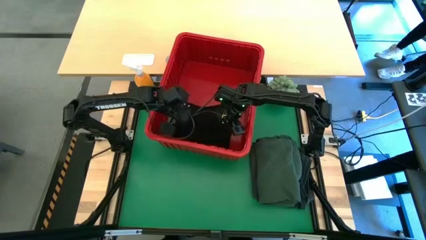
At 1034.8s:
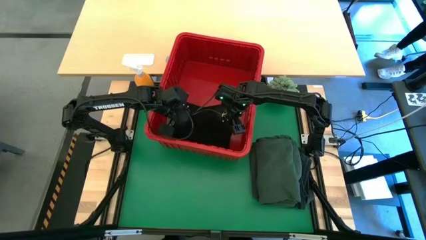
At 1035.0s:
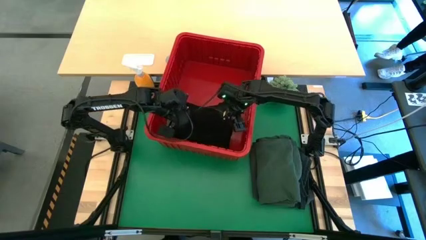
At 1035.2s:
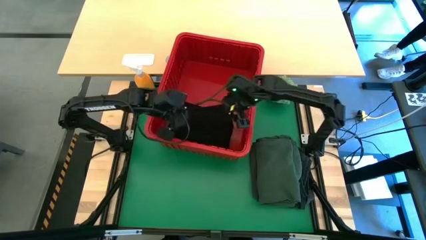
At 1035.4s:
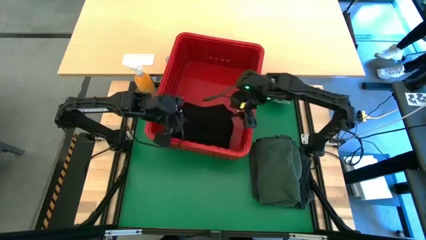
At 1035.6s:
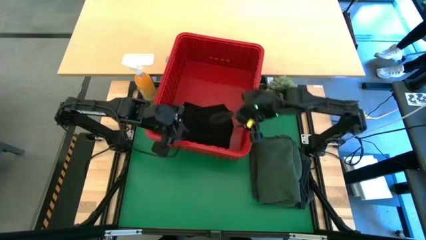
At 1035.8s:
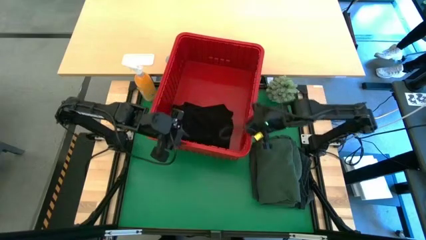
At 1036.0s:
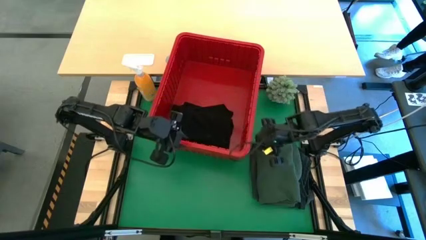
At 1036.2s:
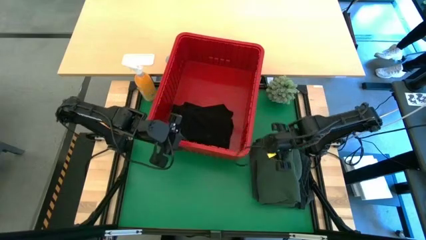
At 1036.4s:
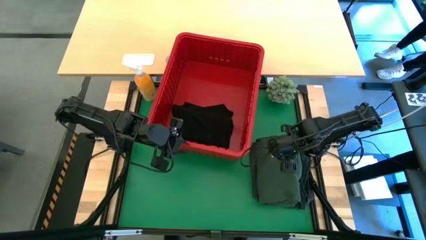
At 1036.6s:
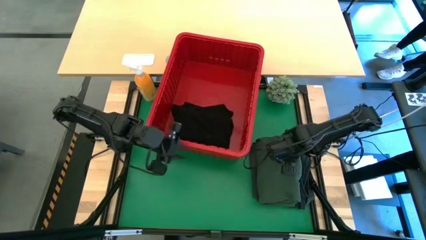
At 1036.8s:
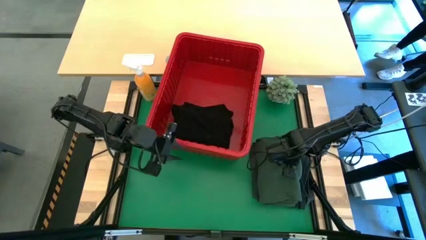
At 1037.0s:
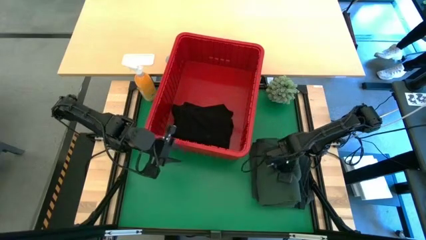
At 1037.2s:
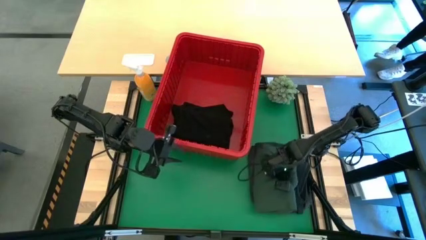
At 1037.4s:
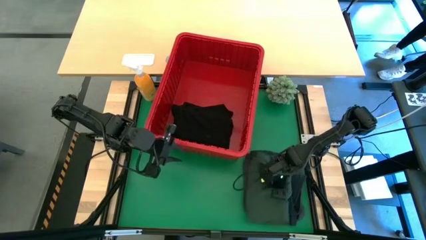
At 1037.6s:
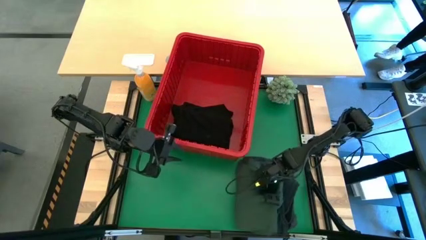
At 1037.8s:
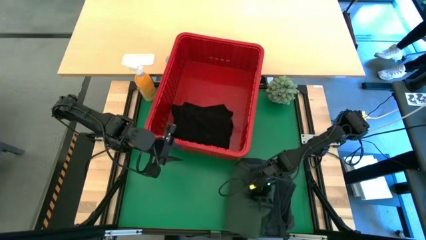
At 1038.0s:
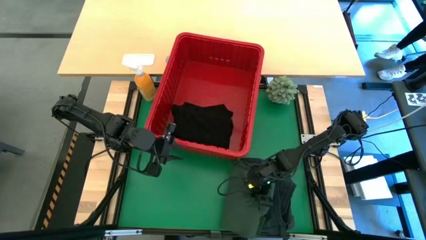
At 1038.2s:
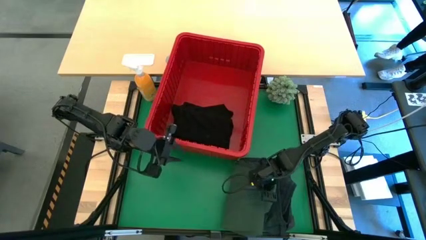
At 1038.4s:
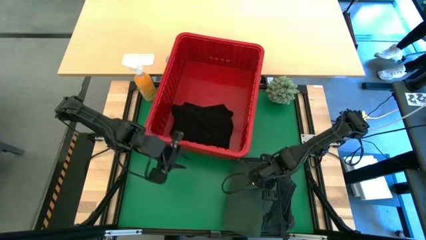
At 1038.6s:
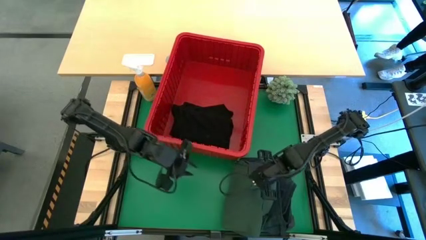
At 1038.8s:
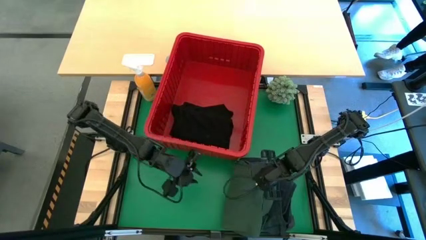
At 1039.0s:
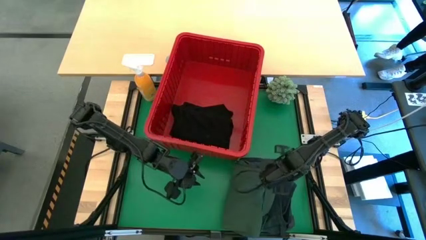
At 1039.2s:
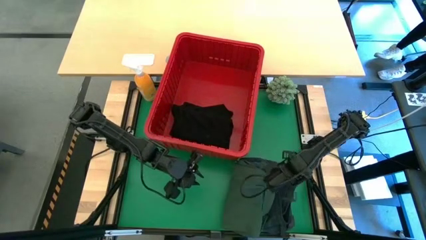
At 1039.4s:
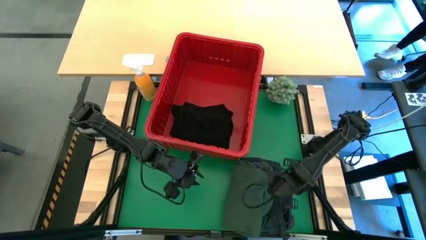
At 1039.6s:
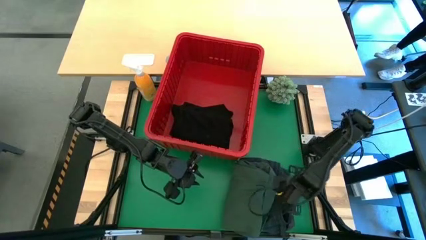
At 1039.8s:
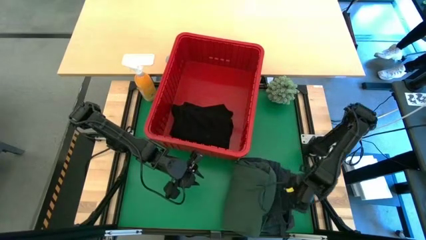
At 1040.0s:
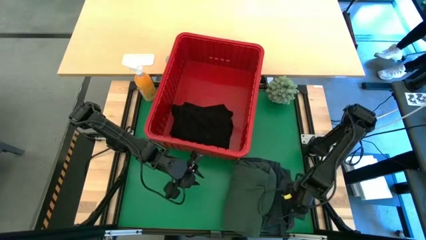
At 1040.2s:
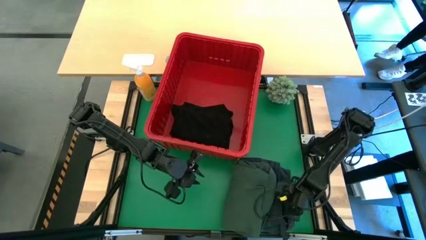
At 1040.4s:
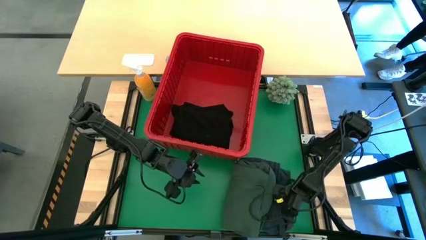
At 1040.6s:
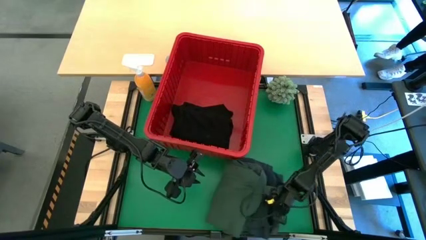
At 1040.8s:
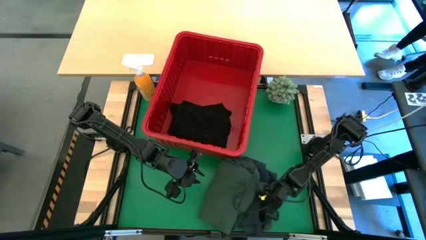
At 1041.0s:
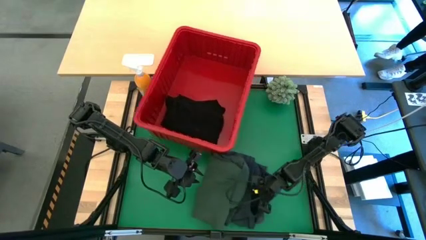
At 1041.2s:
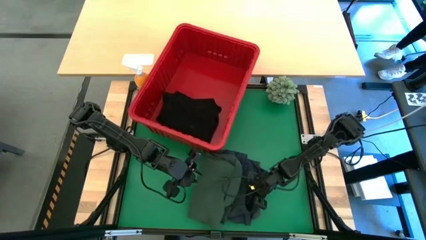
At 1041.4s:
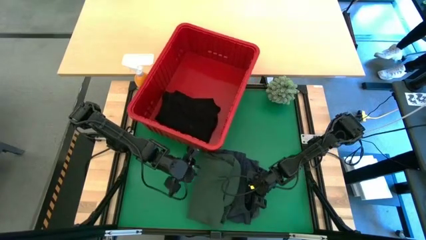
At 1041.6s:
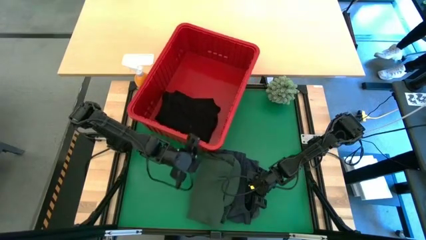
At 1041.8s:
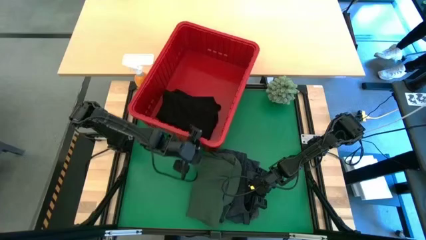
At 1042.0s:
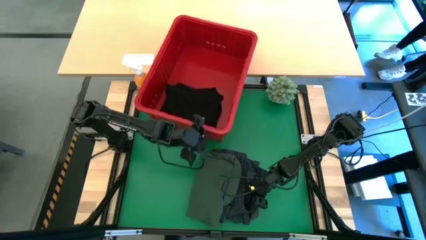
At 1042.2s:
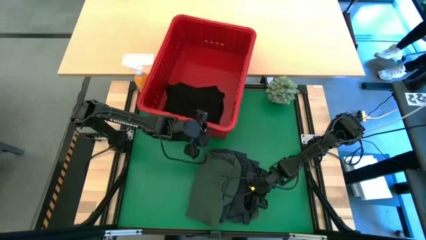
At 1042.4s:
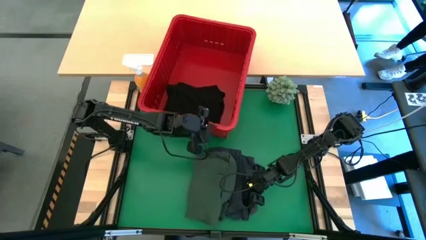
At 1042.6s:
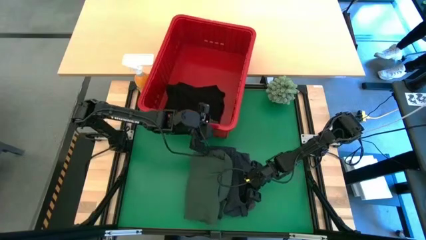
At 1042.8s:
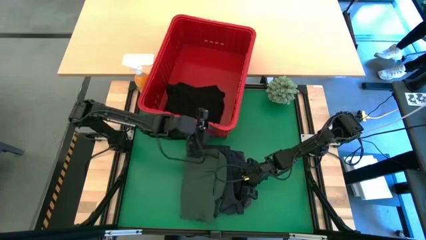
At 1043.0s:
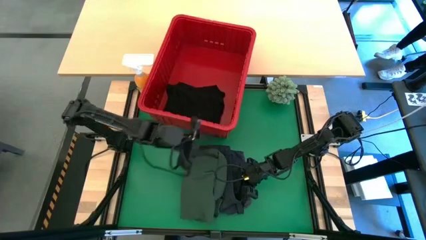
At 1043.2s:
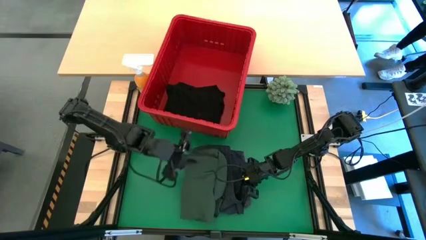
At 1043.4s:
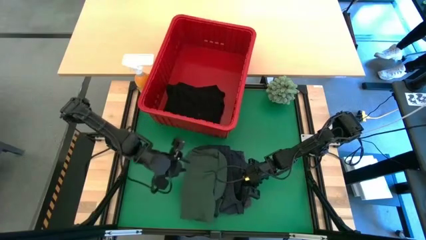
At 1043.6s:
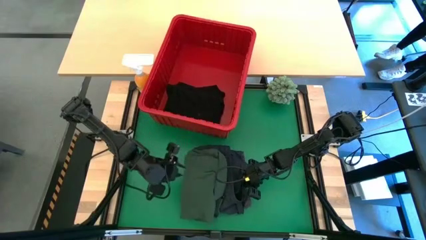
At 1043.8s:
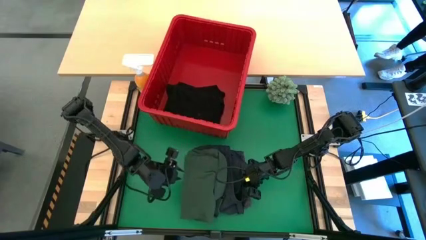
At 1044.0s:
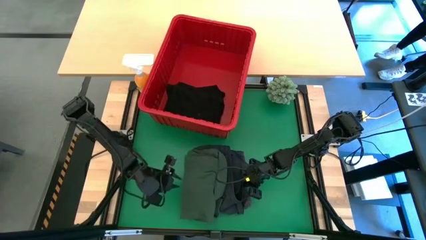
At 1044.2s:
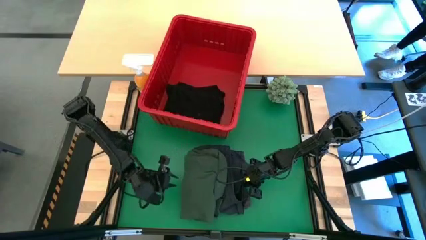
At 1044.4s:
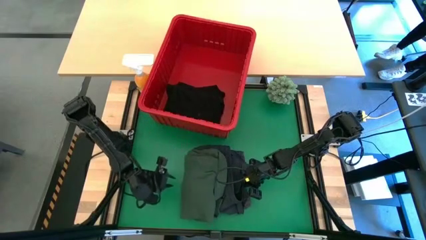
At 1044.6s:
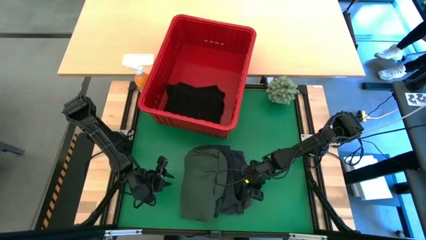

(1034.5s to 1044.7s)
Task: Fold Laundry from Bin
Move the stack clothes to the middle

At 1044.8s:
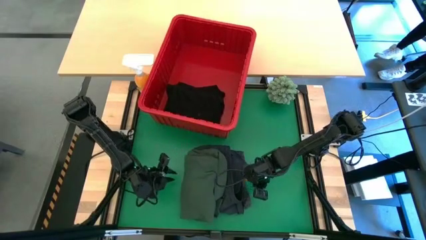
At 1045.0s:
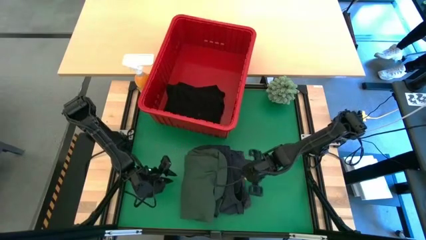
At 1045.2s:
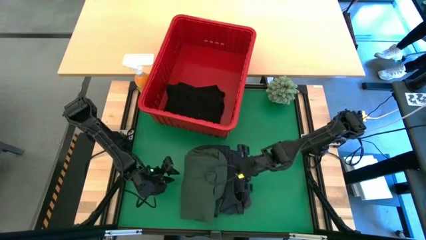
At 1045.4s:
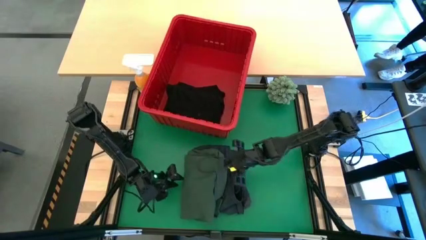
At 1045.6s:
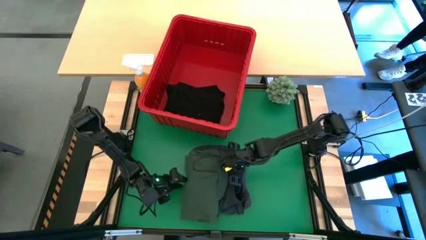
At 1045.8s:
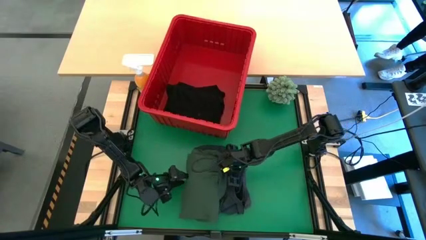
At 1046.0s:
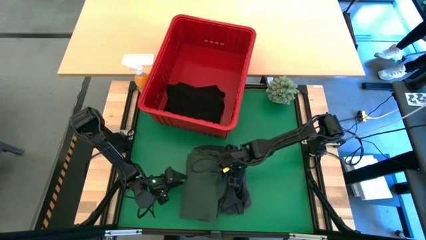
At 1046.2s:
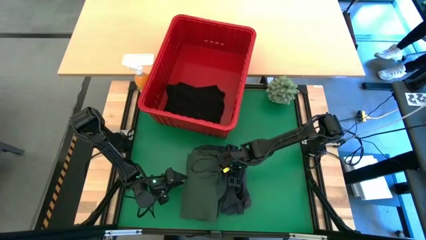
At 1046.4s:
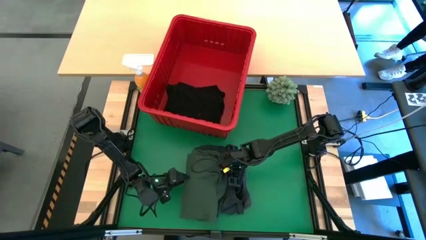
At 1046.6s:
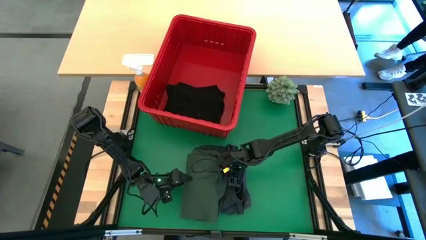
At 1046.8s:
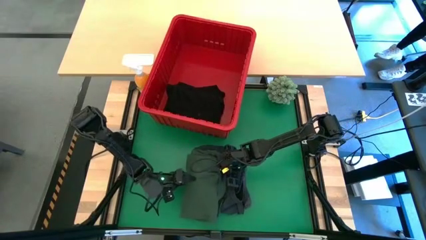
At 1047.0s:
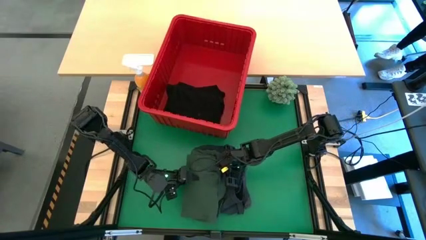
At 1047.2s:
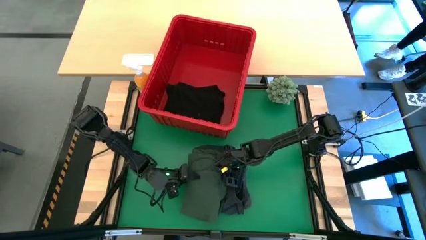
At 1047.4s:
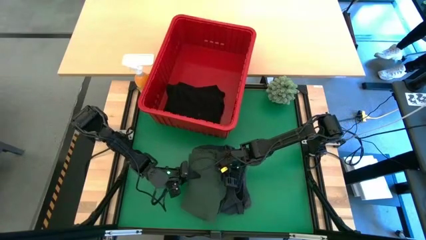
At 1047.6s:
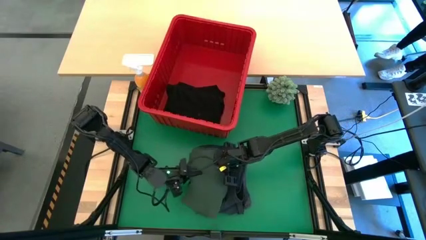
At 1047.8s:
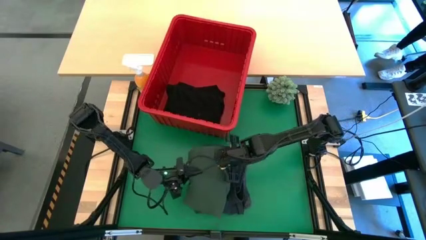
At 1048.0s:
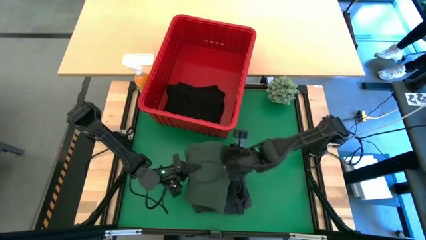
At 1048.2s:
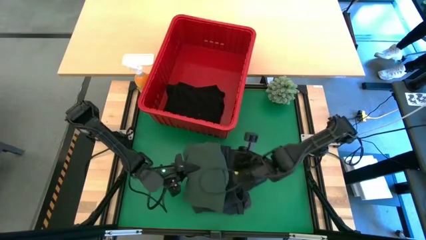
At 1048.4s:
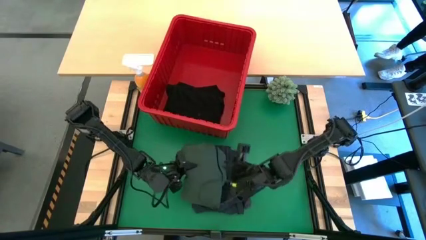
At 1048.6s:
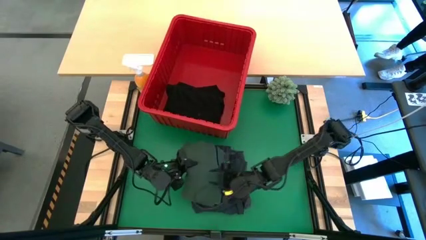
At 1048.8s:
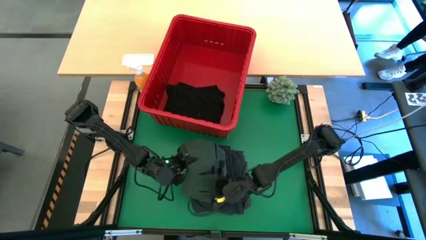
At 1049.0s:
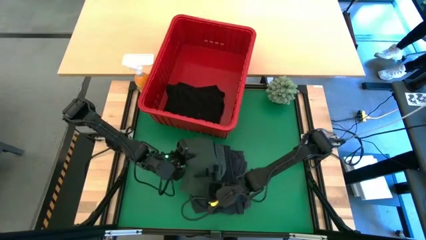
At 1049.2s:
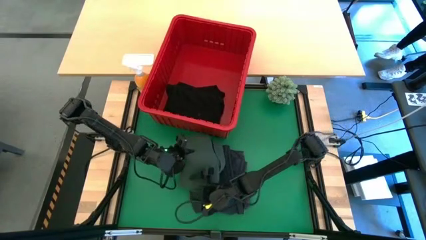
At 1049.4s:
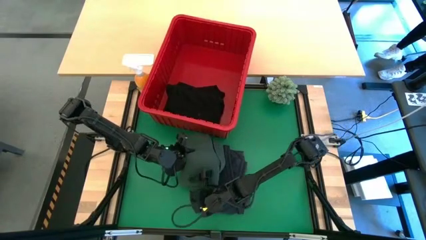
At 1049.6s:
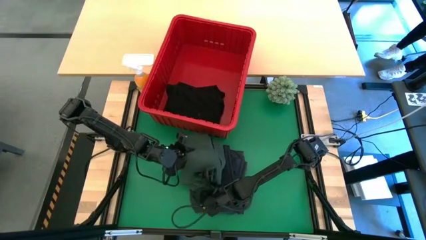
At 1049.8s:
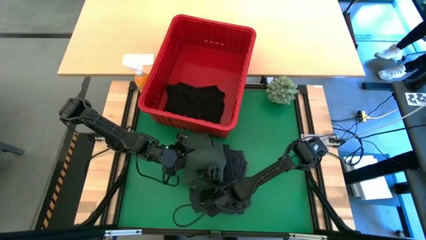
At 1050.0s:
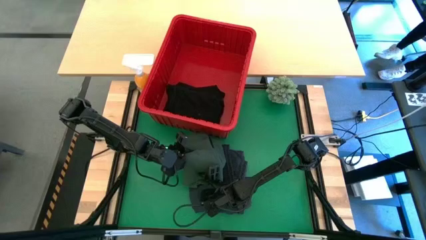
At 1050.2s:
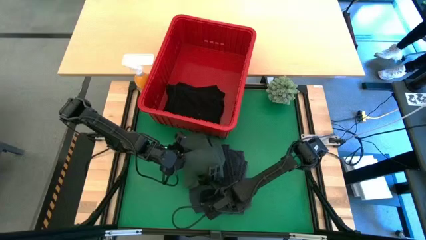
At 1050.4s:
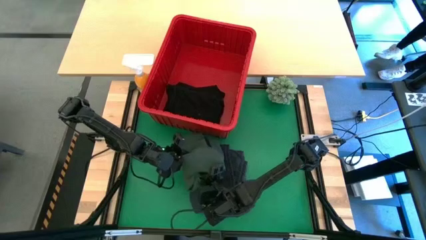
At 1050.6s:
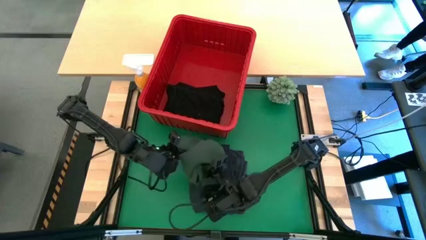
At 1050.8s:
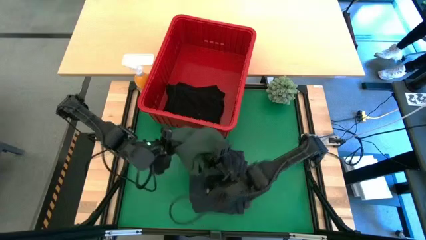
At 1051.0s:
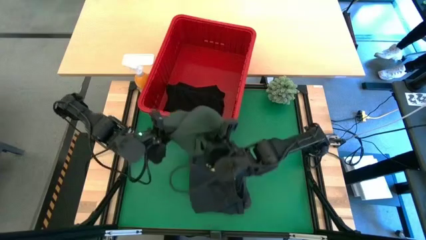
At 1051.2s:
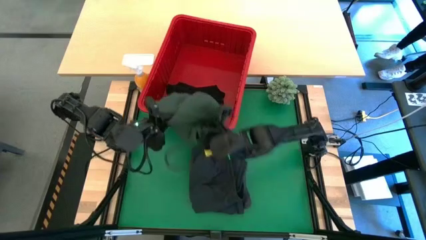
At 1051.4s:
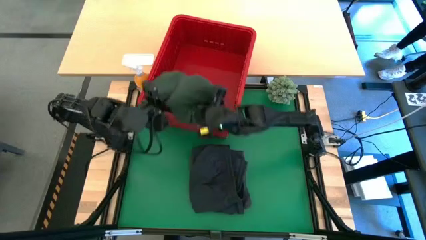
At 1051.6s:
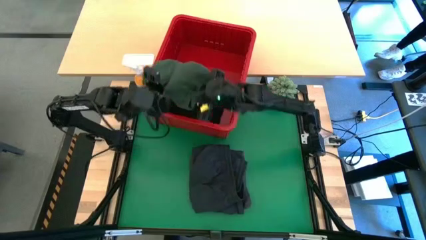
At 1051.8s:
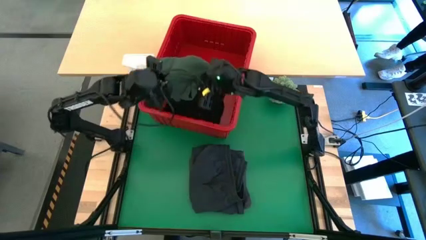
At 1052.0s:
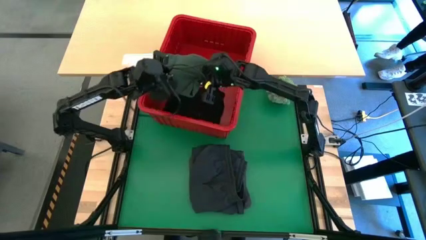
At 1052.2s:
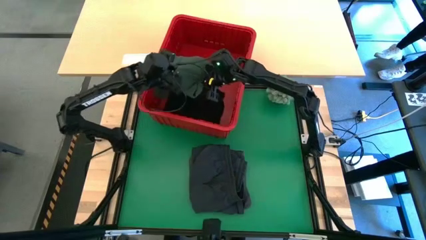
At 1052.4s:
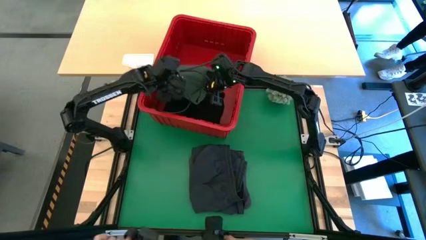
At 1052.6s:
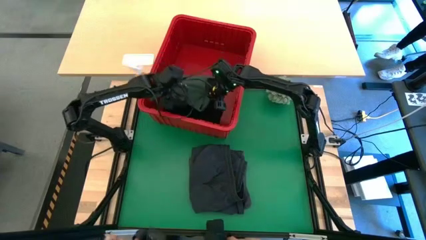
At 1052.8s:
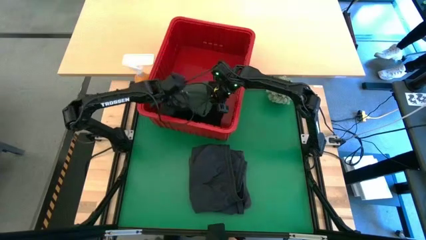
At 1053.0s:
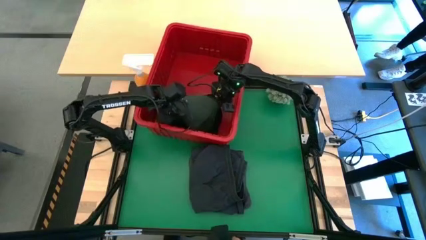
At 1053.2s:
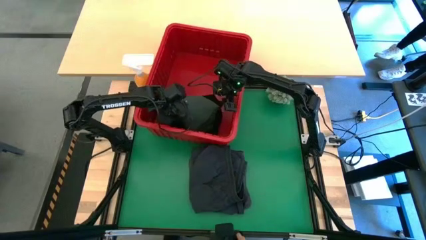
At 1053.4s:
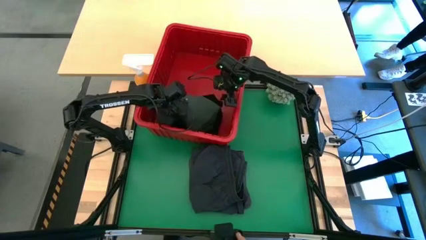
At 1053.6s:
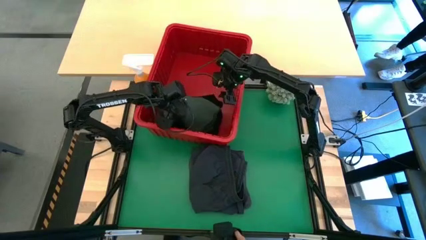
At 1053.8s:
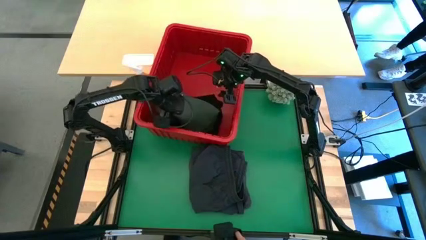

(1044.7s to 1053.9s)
Put green polo into the red bin
